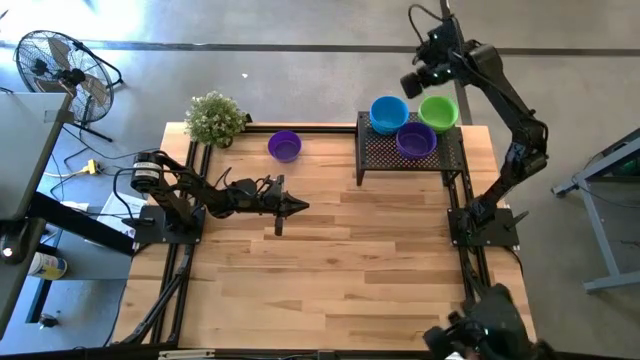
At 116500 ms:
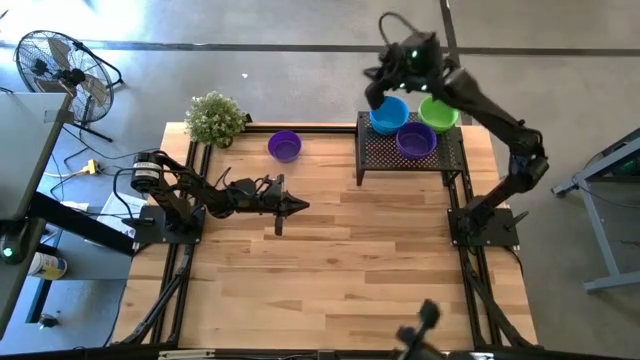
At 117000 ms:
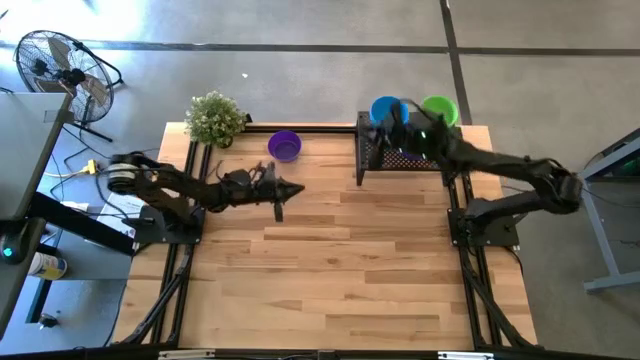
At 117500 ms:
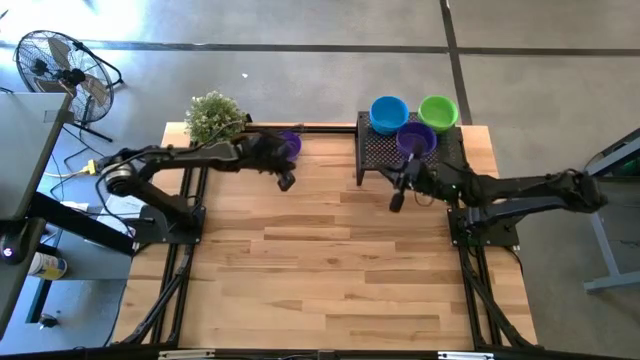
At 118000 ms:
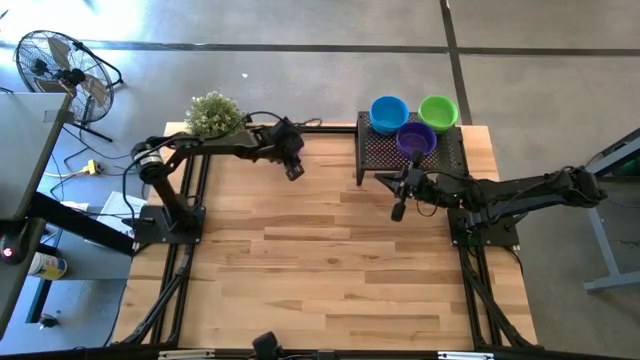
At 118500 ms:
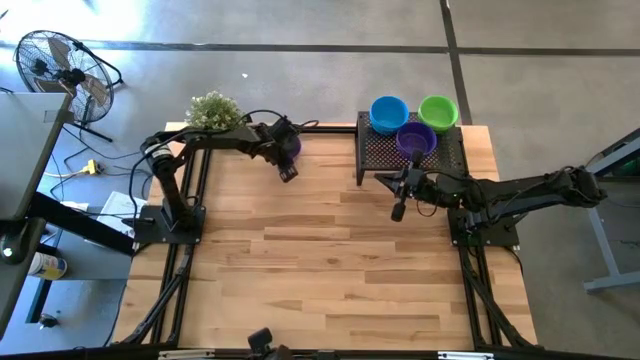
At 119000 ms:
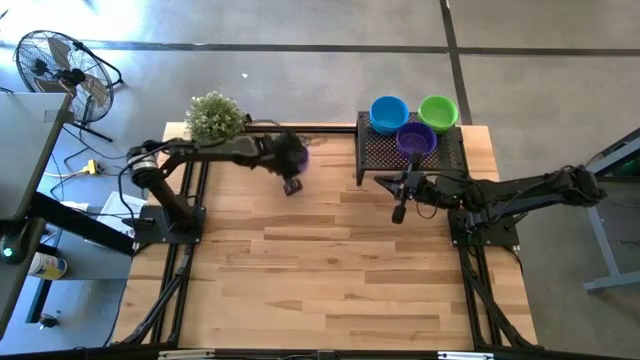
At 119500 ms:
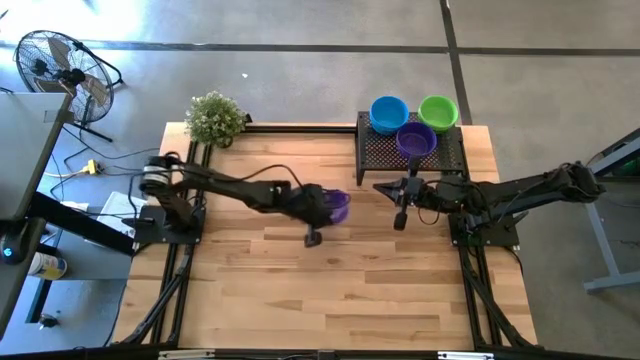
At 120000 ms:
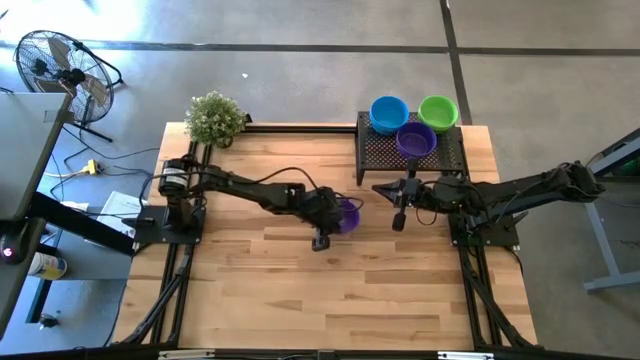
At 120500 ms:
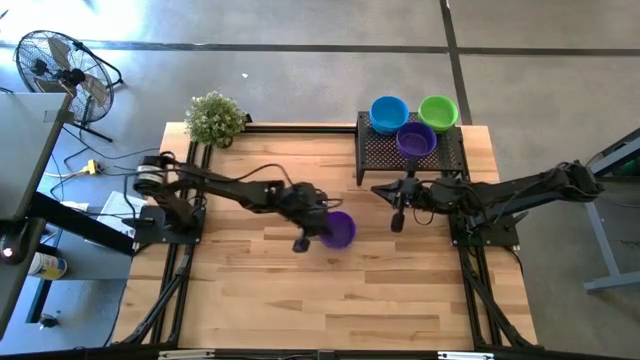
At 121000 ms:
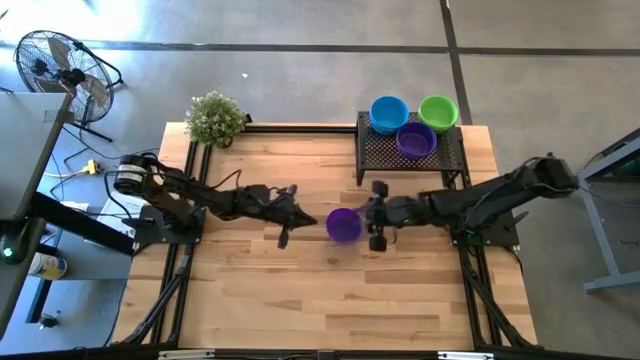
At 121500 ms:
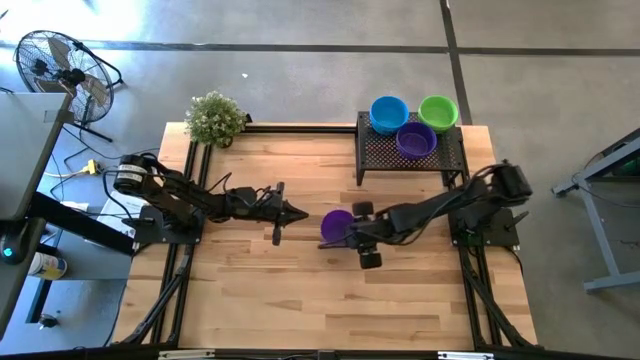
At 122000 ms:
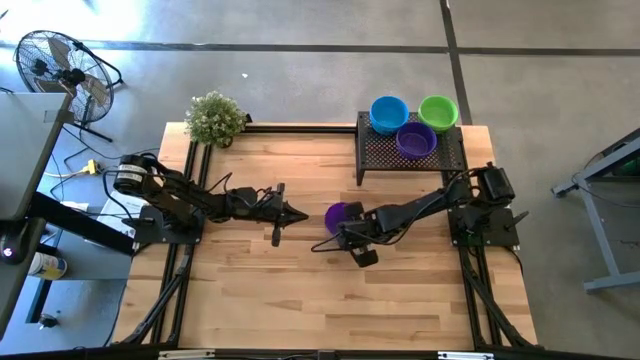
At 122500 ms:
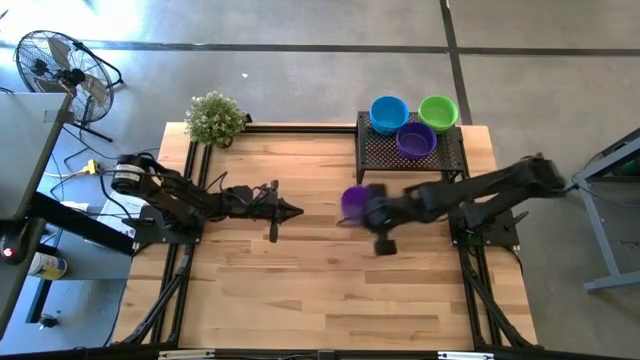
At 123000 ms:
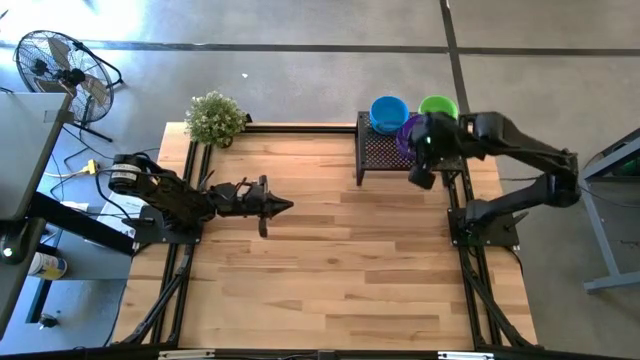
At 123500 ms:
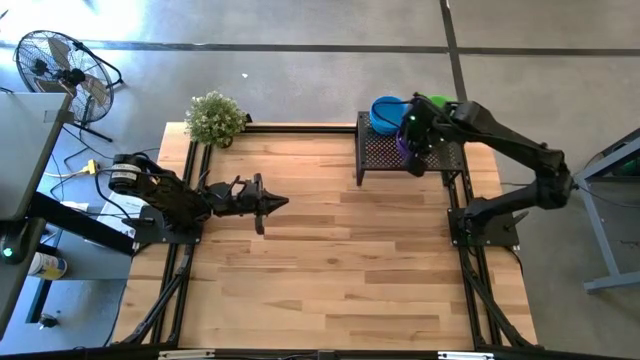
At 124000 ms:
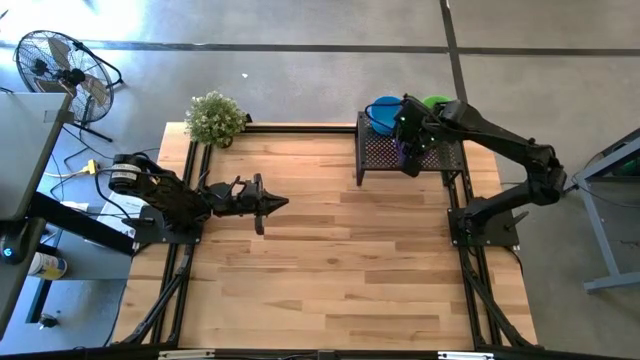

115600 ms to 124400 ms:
Task: Pick & Place Mini bowls
Stack the dark blue bowl on top of the dark blue bowl on the shelf

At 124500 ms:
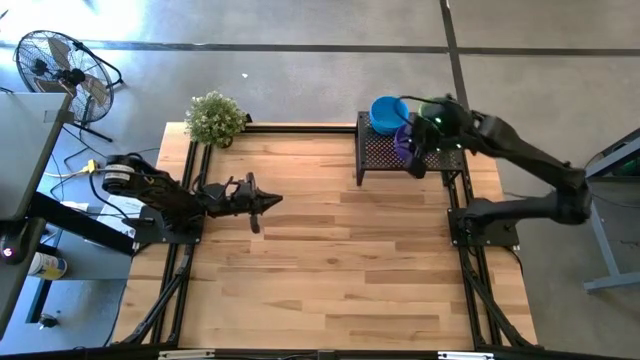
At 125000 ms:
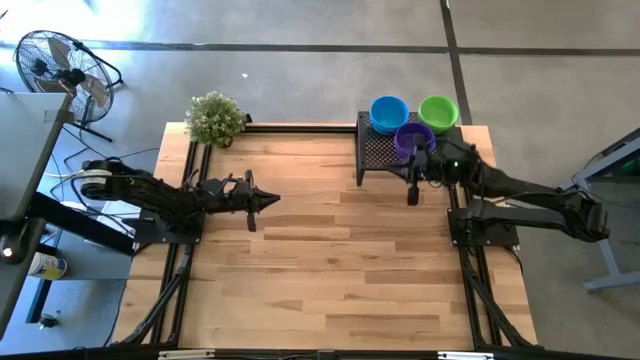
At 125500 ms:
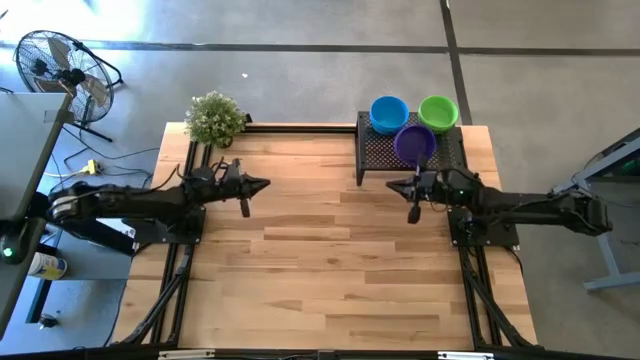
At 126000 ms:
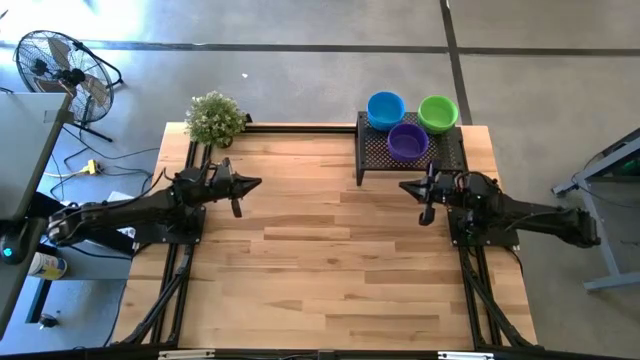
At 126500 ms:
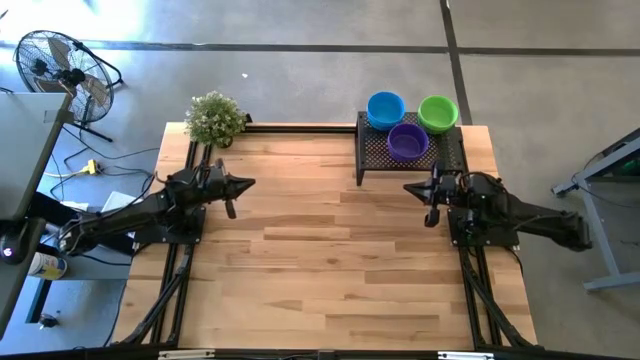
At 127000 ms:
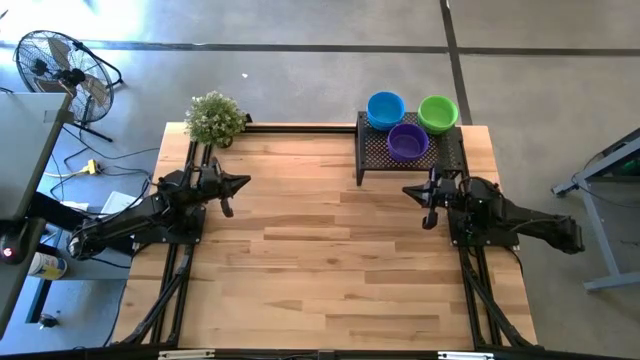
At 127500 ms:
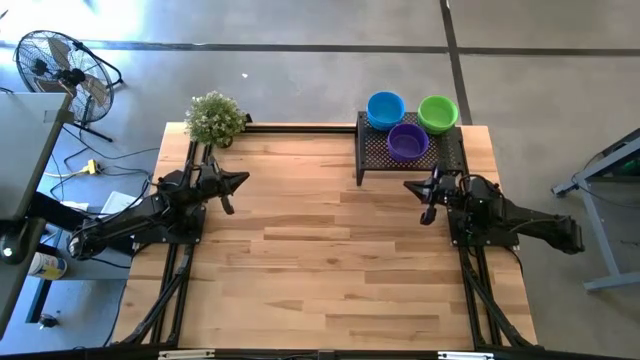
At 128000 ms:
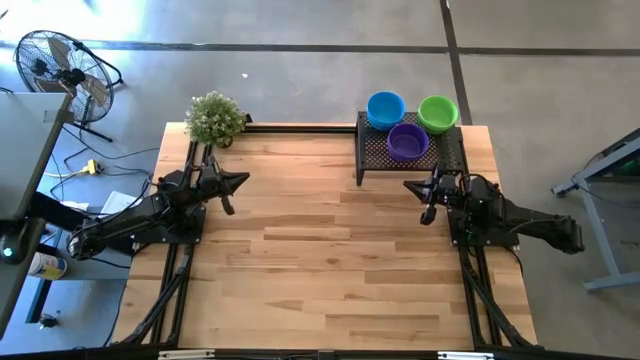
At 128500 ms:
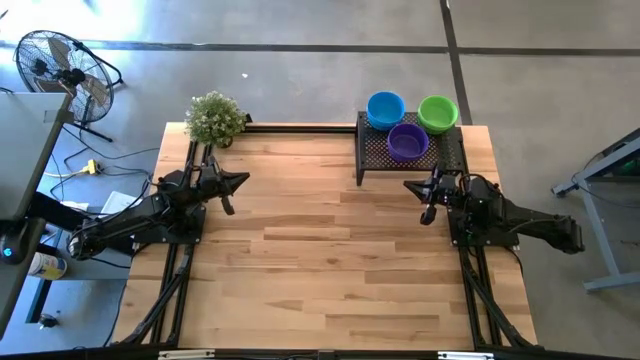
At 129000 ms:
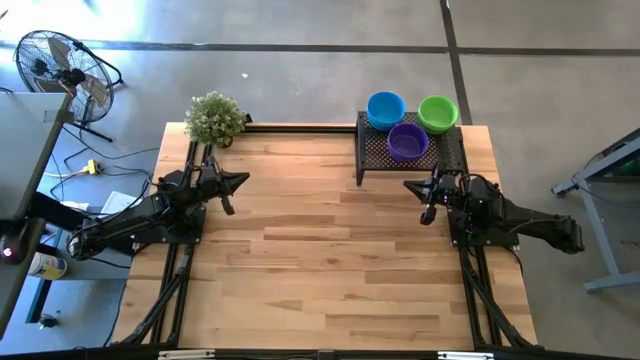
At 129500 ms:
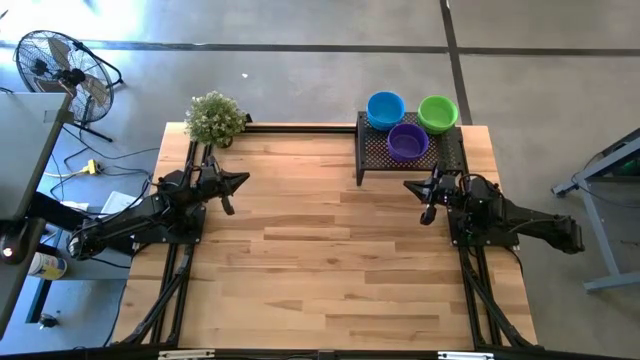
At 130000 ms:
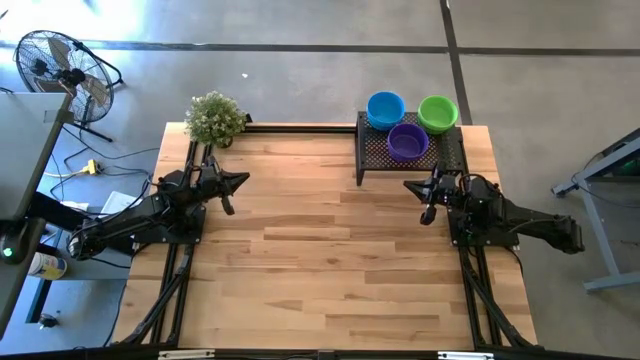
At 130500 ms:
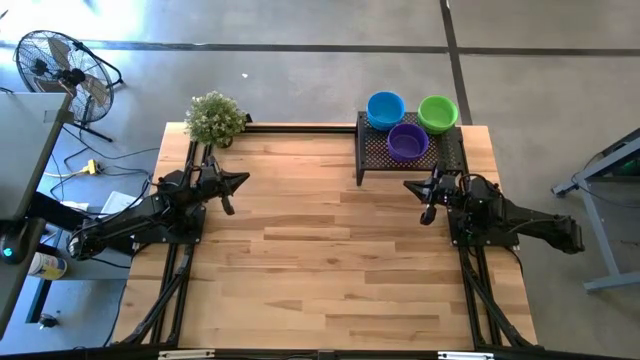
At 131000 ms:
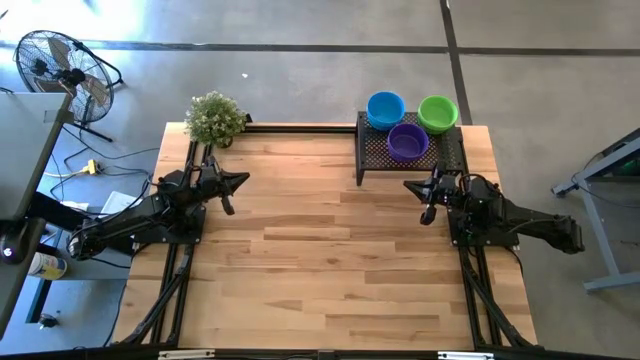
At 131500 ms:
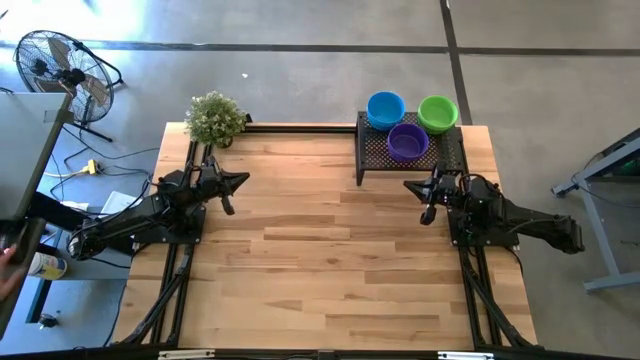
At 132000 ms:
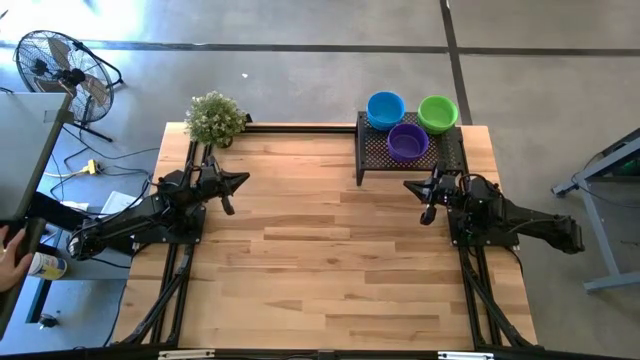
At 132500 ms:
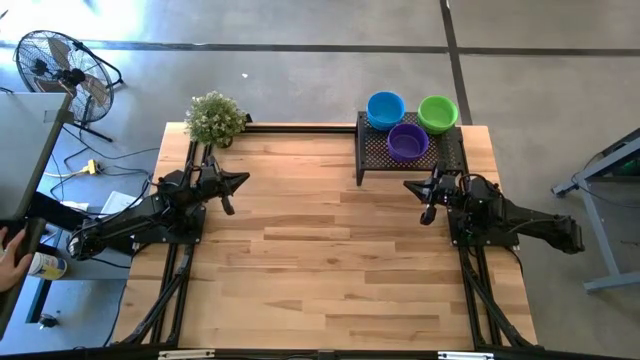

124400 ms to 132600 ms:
Return to Home Position

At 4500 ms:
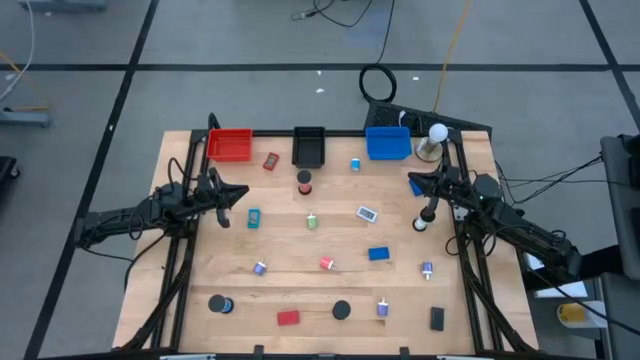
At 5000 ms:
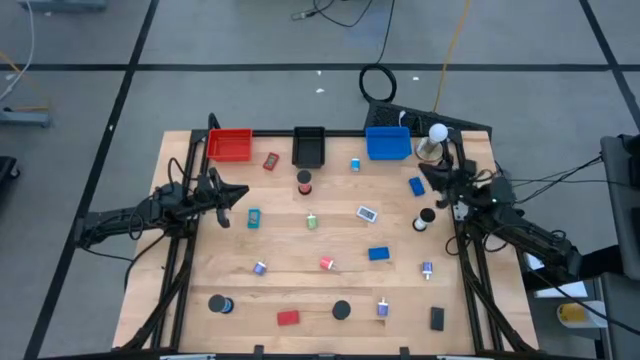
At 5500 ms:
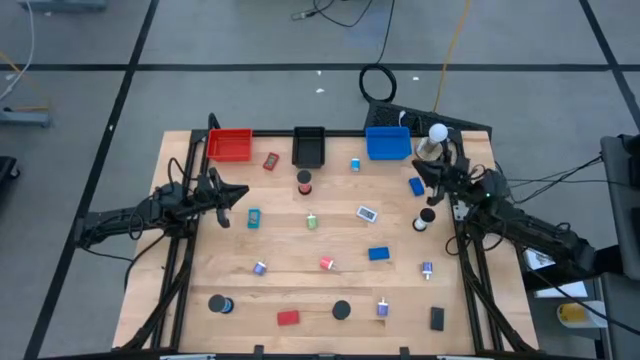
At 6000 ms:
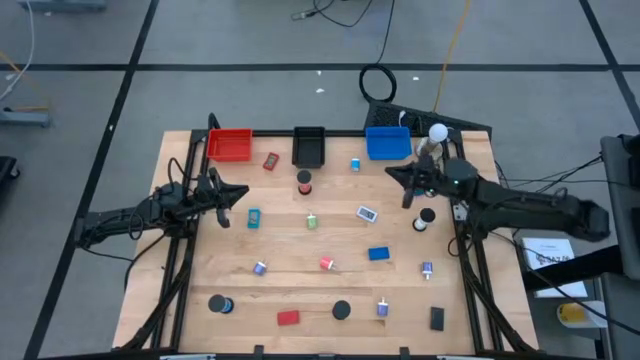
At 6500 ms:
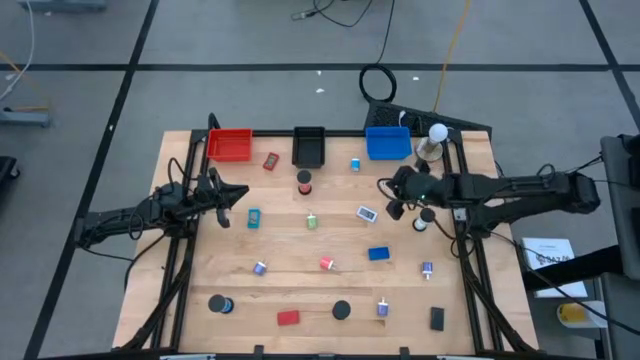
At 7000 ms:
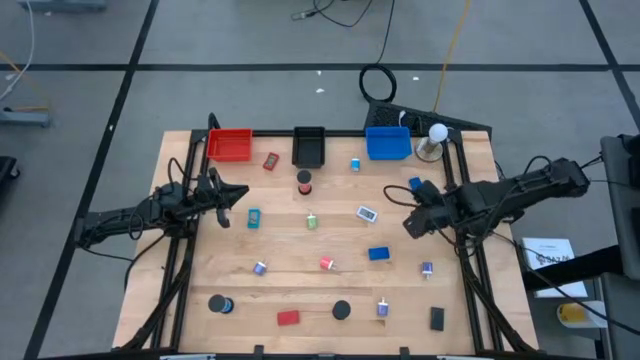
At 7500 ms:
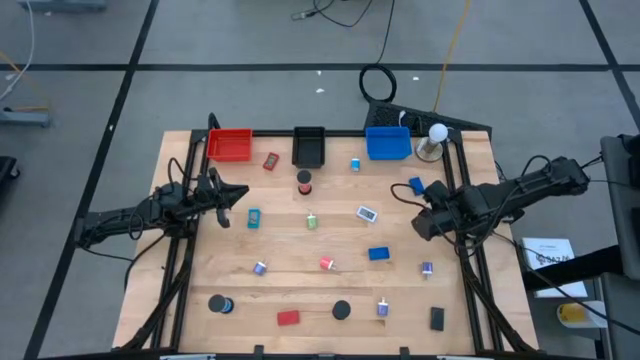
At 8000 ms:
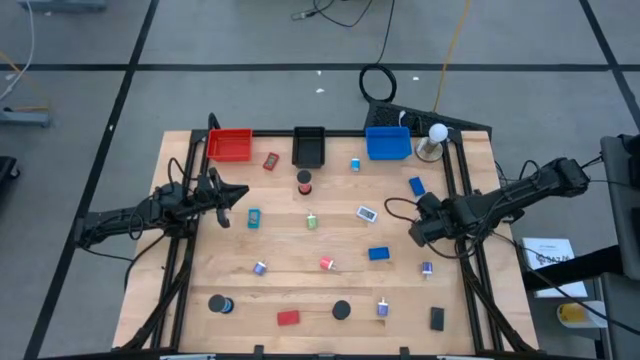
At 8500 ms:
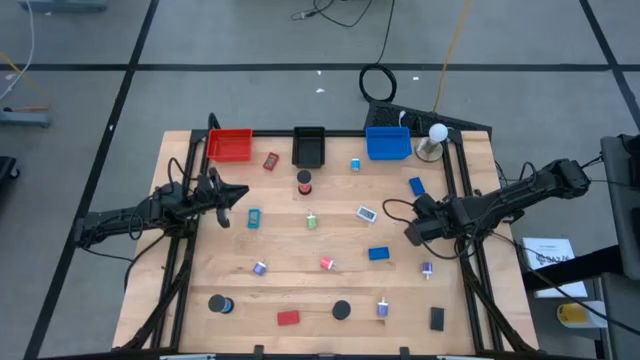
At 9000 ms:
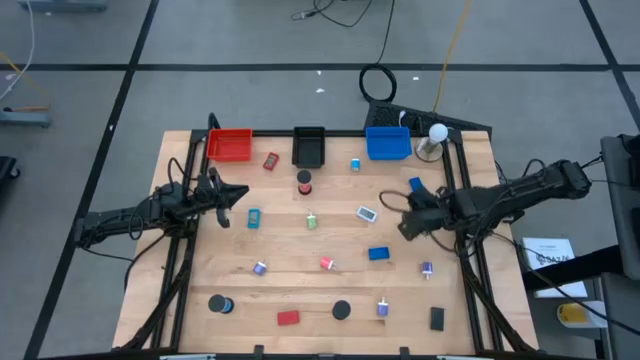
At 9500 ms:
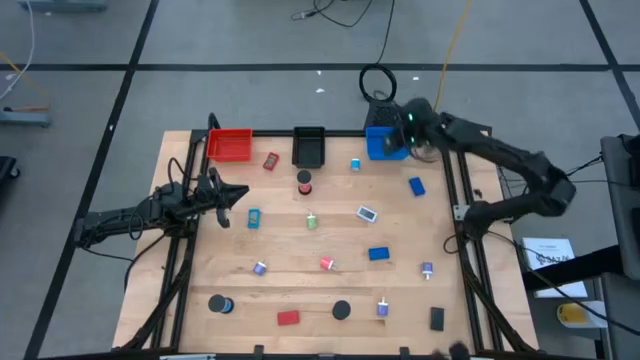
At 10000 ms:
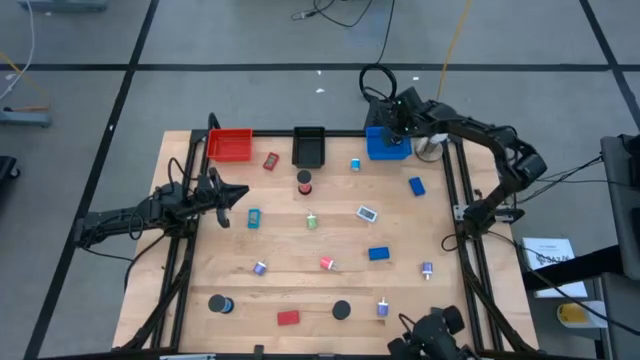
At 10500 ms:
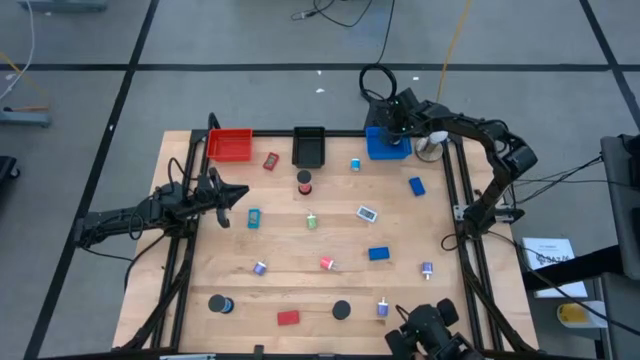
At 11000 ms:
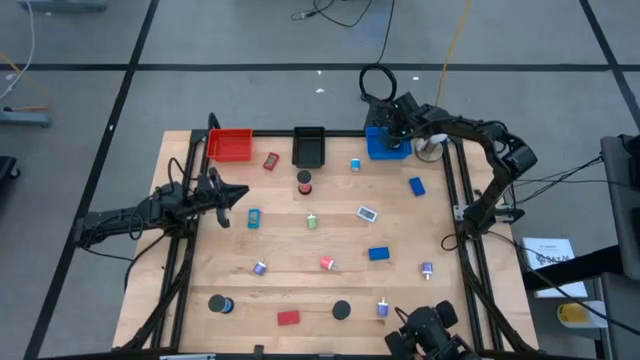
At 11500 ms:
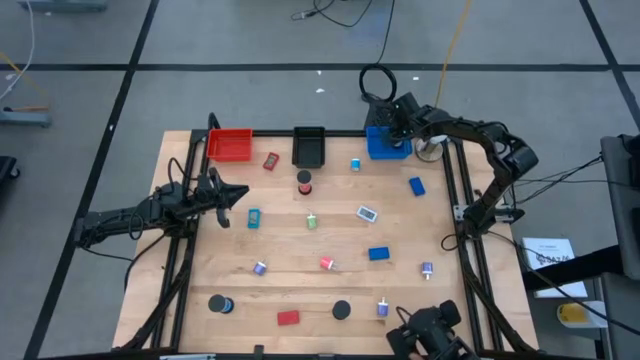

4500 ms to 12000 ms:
Task: Pick & Place Office items
Put the white hourglass into the blue bin
